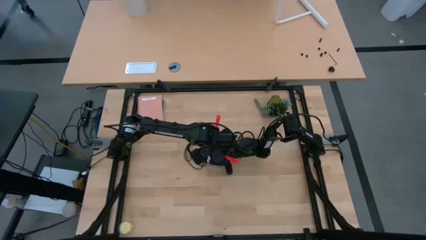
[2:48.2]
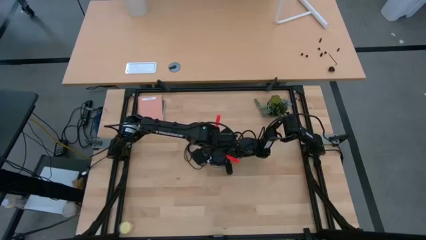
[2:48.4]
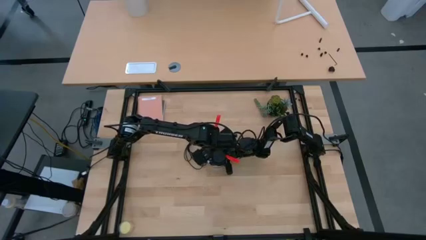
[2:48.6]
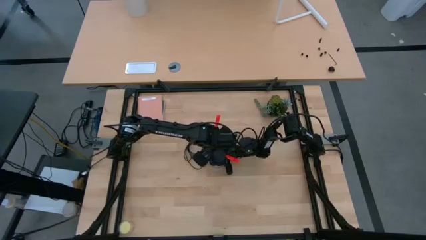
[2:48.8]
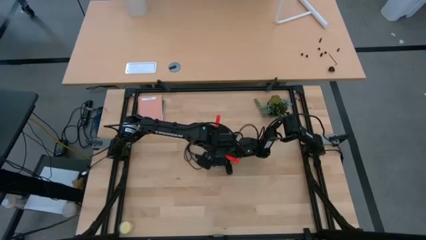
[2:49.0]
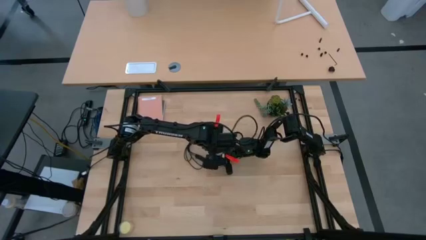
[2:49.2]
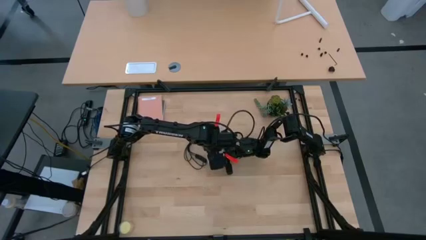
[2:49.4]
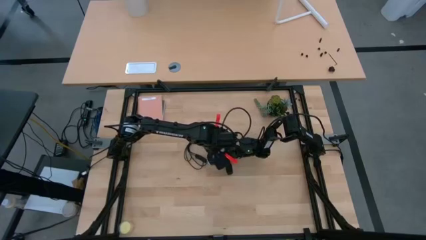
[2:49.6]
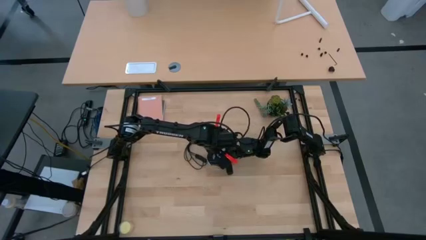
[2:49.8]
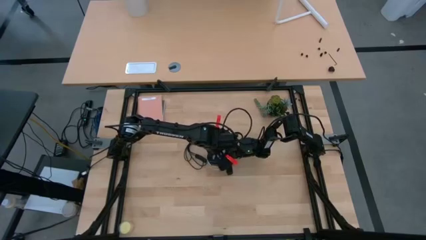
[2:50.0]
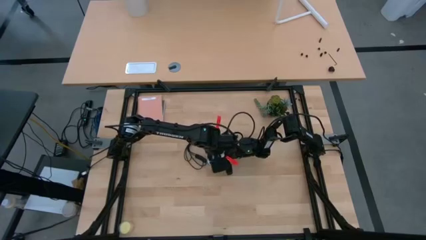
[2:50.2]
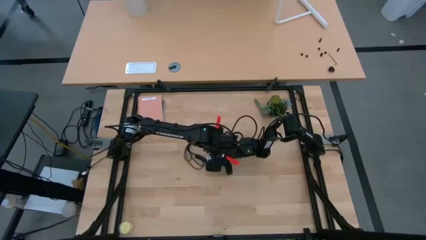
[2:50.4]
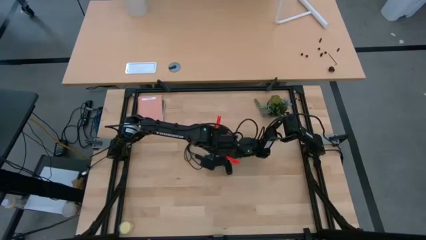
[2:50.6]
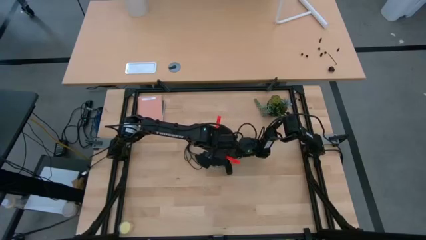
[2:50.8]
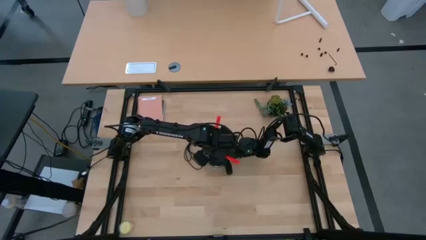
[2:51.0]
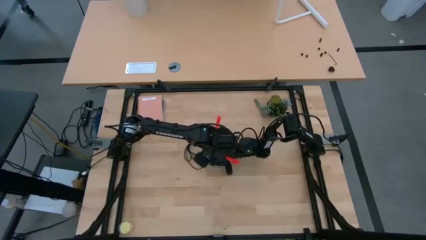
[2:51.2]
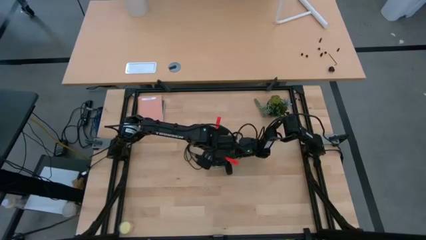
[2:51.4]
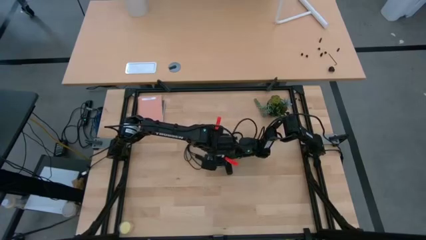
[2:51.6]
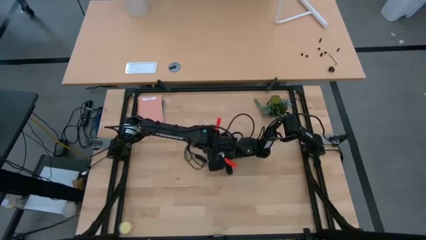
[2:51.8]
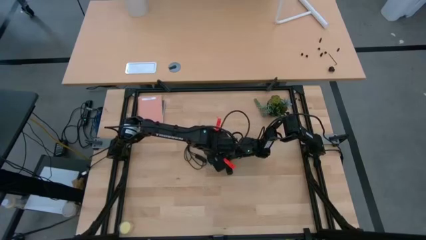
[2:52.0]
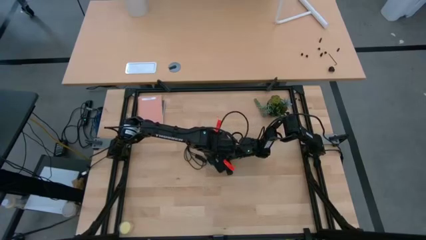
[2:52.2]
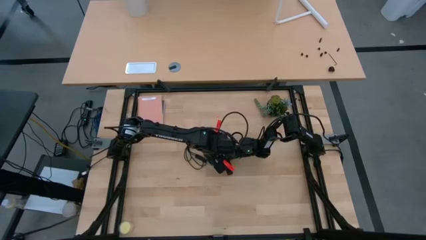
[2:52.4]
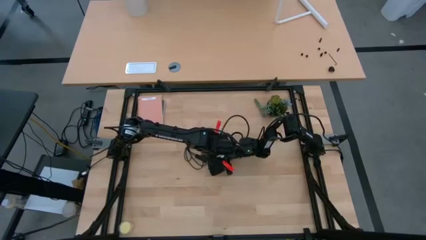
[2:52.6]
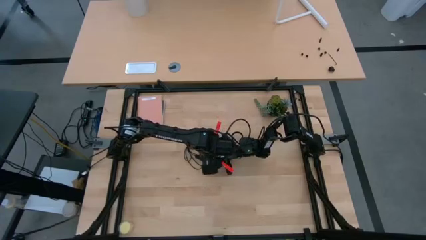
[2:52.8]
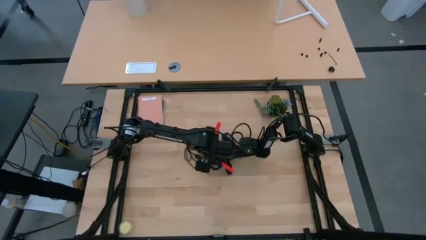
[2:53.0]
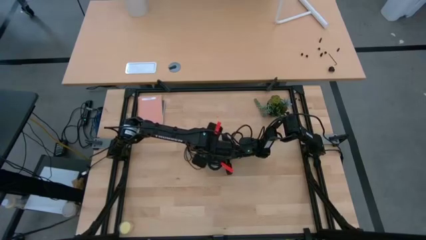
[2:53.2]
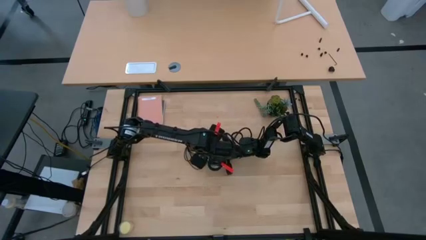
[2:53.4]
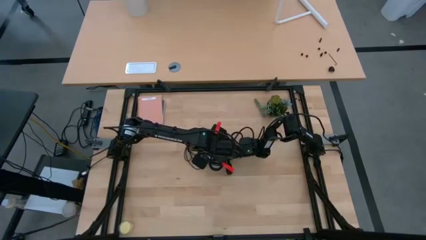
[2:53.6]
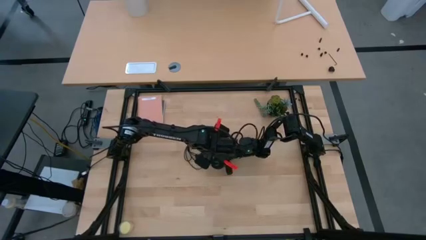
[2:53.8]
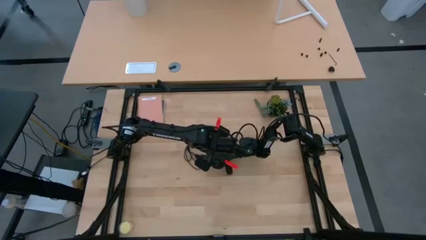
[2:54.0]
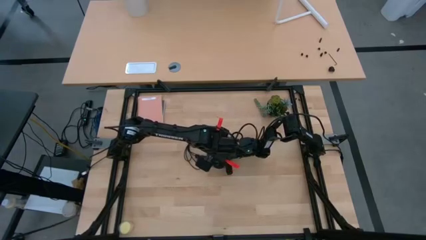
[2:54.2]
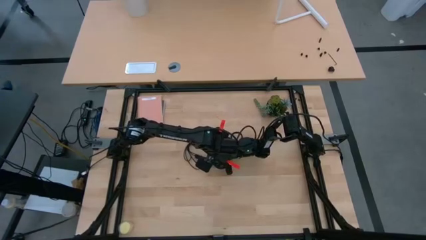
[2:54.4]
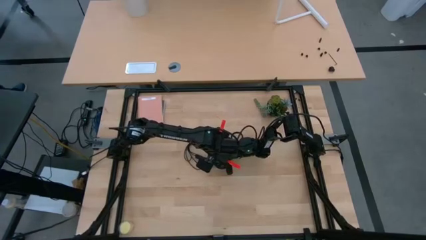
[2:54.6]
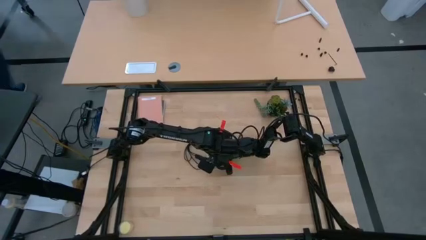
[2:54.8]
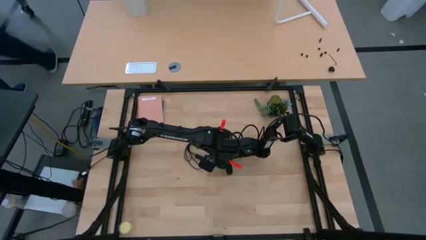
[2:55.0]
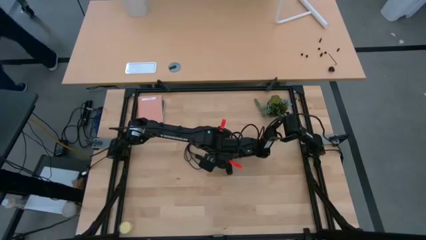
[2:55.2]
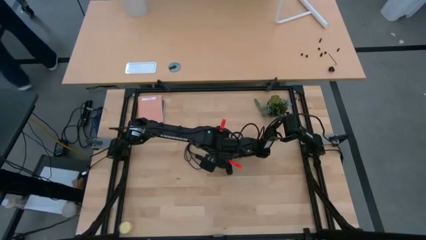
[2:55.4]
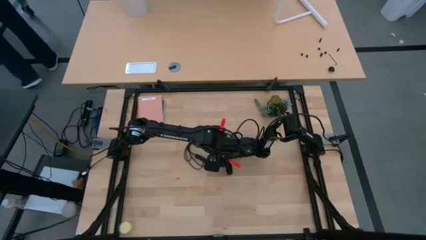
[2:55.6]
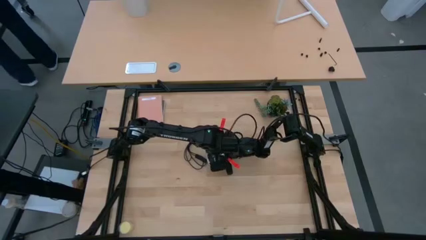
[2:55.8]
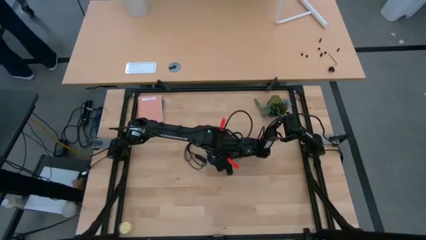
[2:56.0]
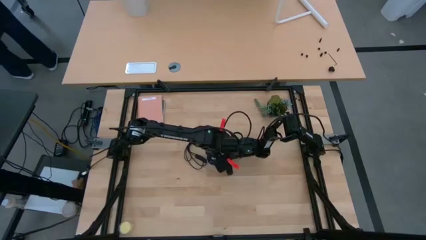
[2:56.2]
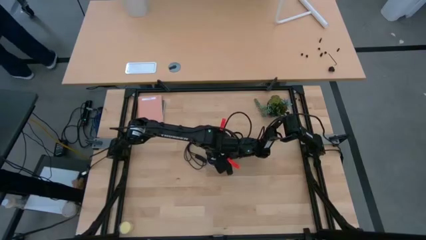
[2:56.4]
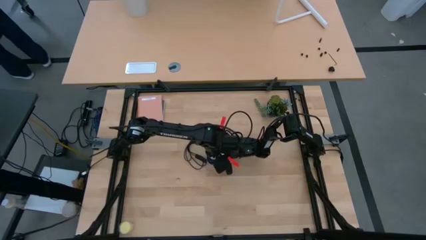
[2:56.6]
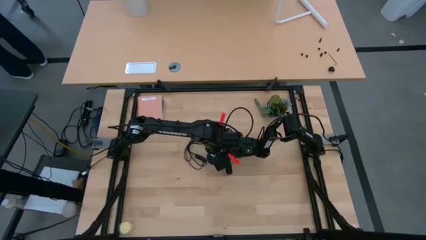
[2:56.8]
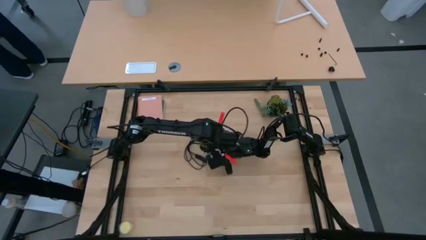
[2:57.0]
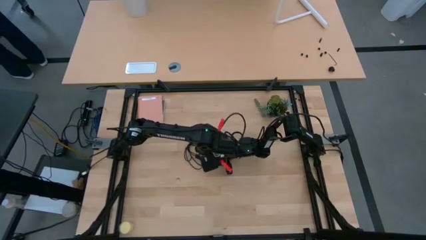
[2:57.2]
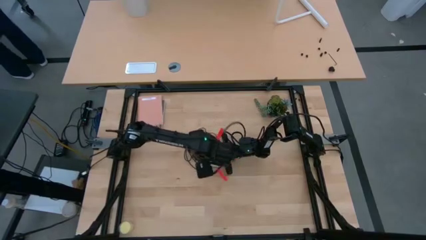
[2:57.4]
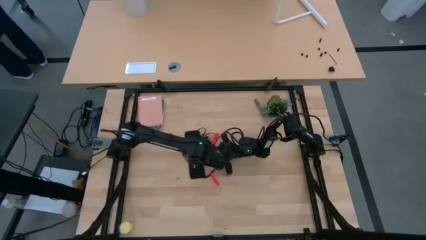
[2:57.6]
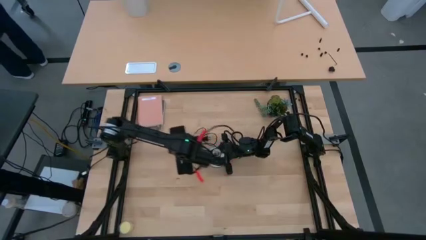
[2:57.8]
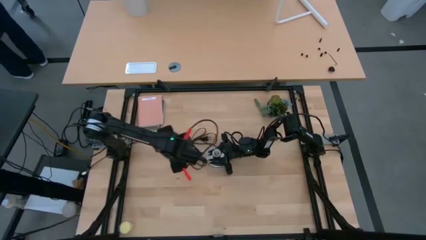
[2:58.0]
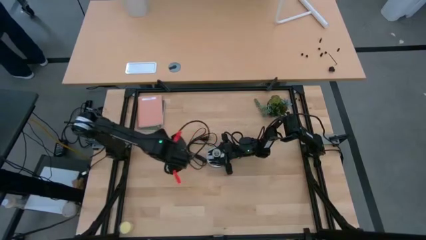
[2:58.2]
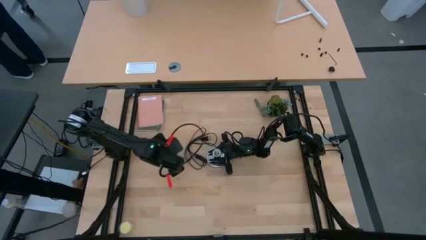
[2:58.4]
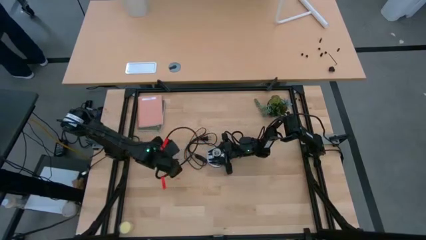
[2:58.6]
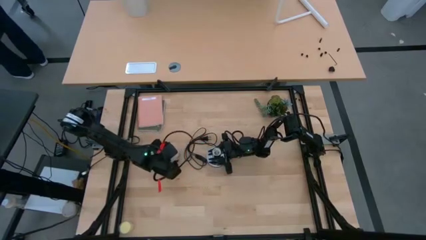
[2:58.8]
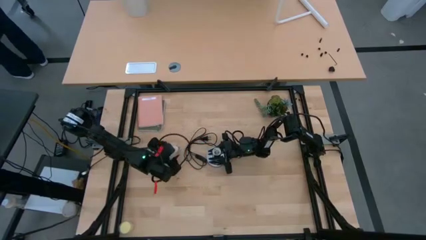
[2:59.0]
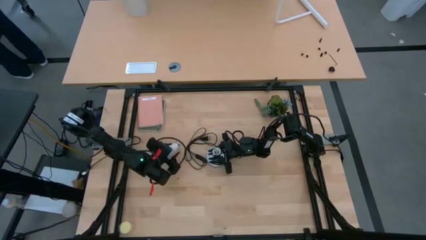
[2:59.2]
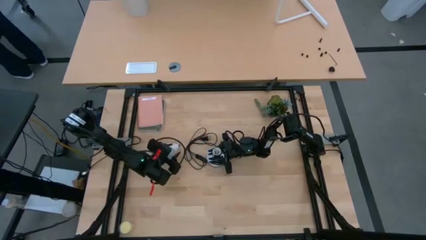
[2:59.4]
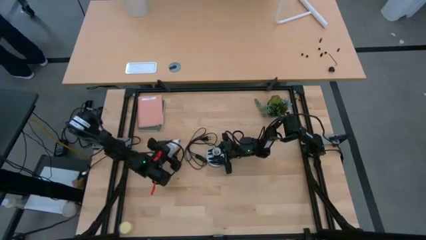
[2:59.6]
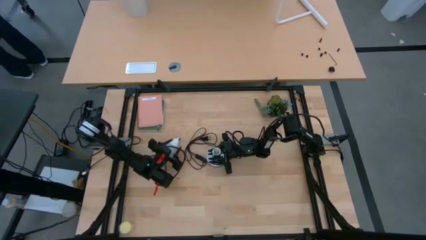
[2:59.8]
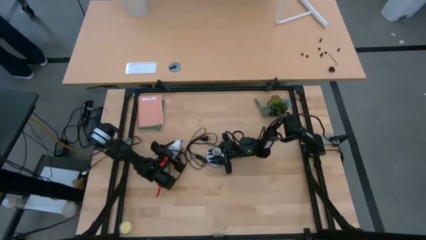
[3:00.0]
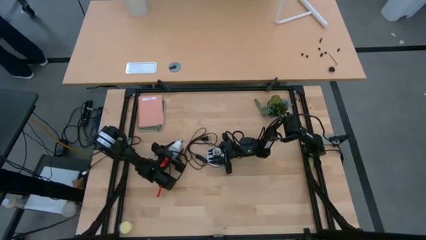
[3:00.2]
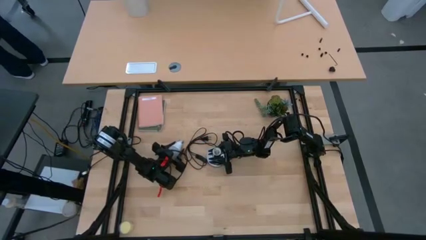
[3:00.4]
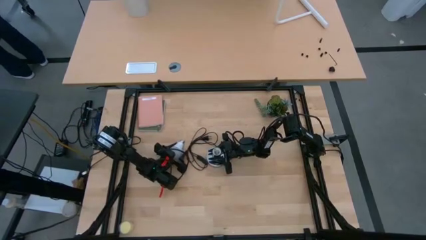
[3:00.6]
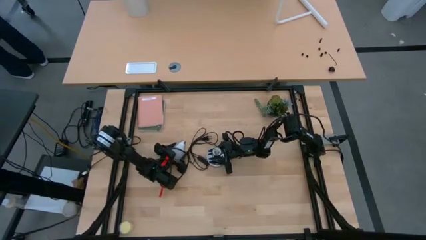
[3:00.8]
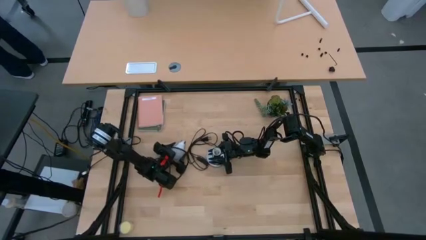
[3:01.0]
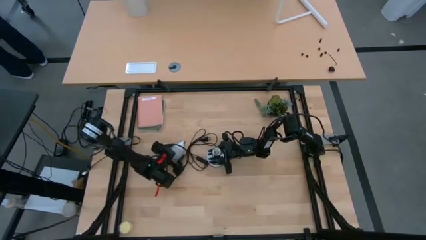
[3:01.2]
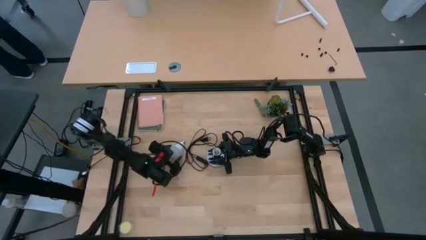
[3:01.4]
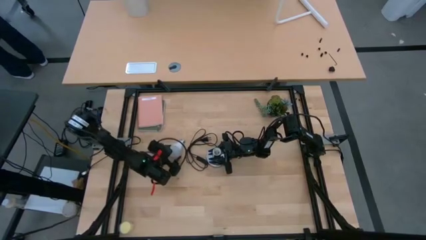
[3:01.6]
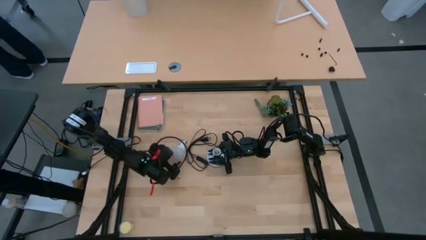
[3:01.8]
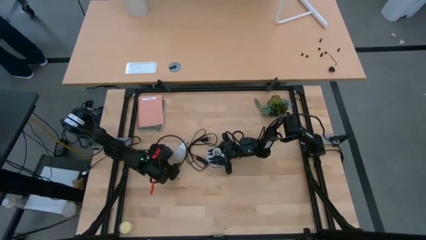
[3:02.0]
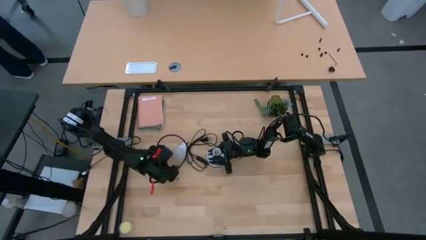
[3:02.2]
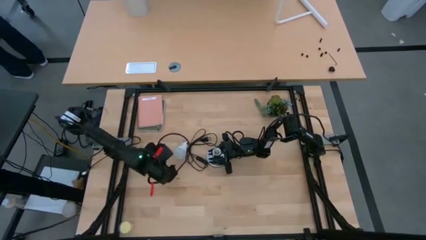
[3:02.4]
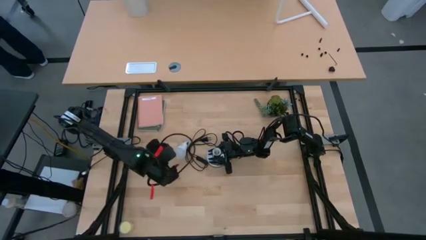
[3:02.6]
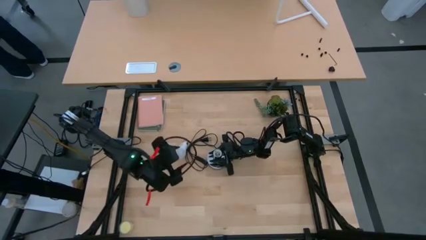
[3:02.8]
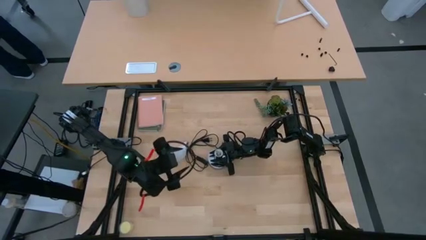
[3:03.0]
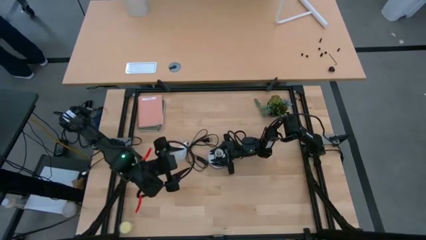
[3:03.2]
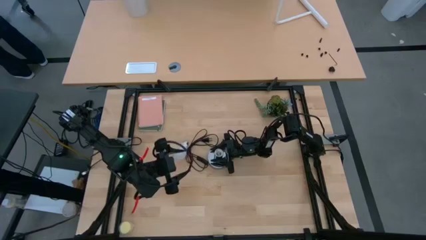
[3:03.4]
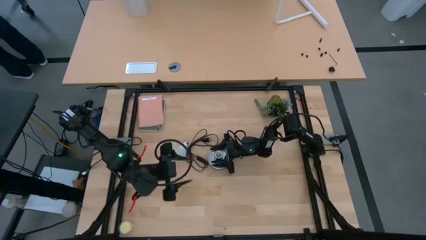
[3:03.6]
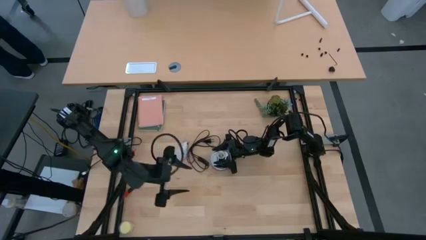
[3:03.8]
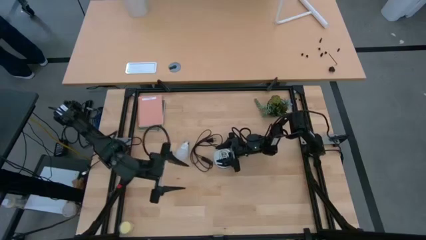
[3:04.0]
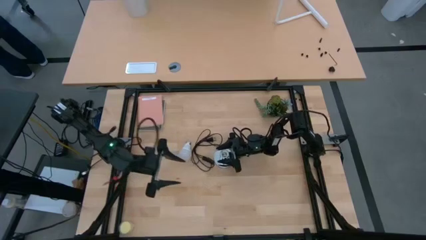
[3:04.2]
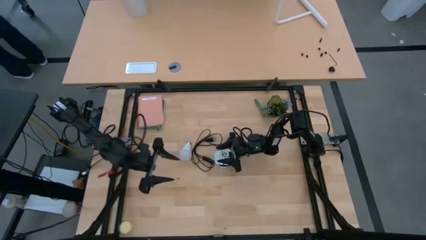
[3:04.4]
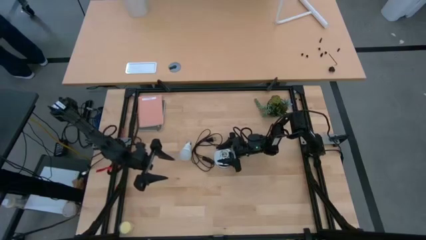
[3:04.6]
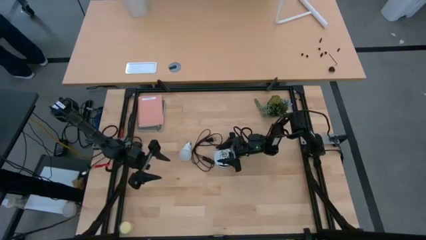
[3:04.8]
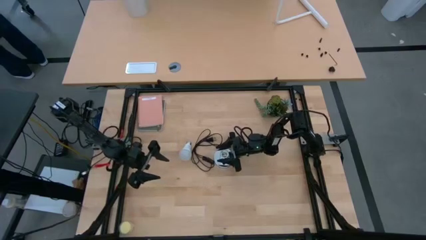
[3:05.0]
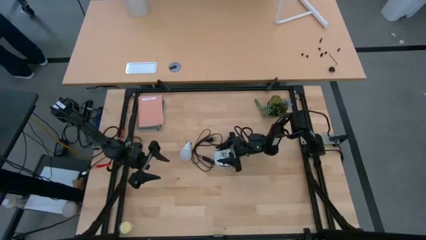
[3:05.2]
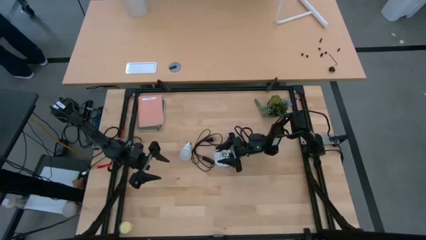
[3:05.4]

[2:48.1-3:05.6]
Task: Screw lightbulb
Remove the white lightbulb from the silver lamp
